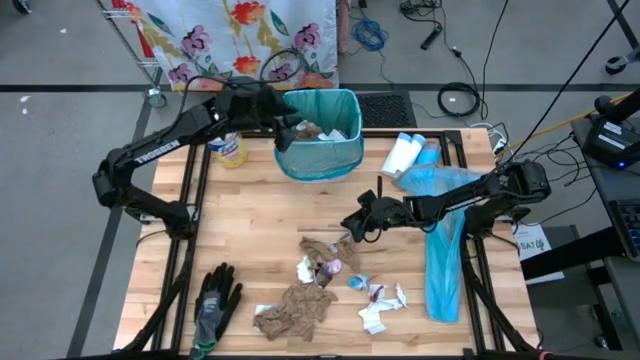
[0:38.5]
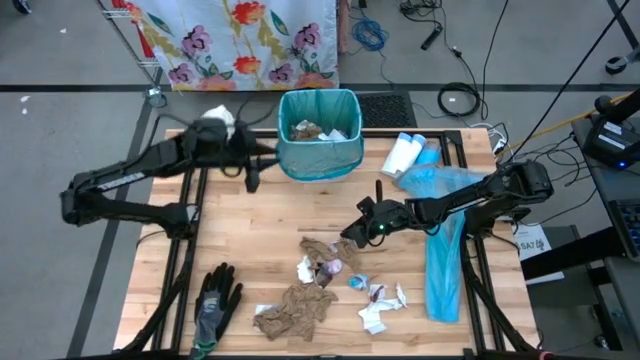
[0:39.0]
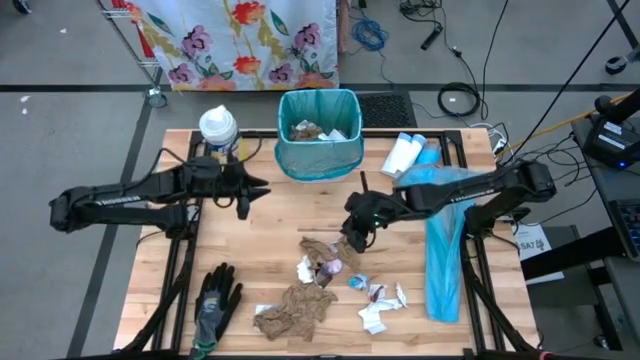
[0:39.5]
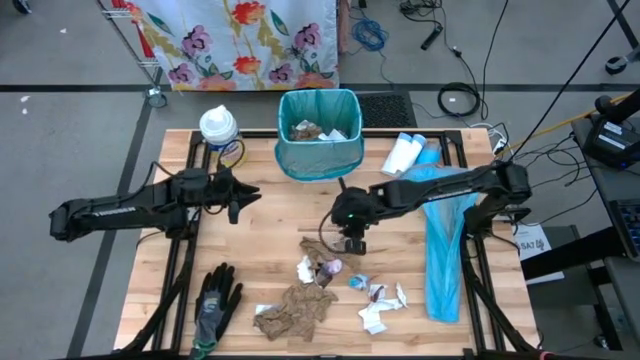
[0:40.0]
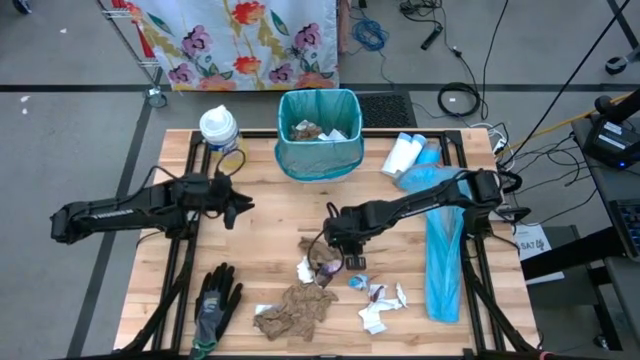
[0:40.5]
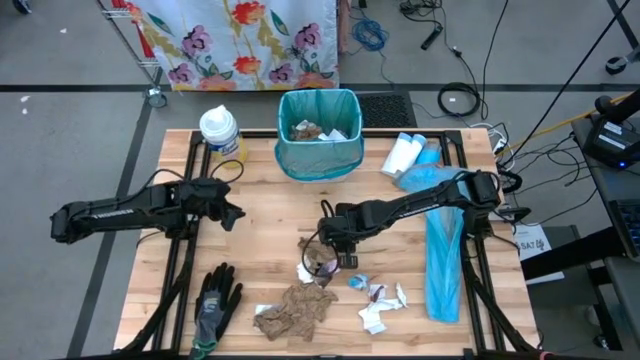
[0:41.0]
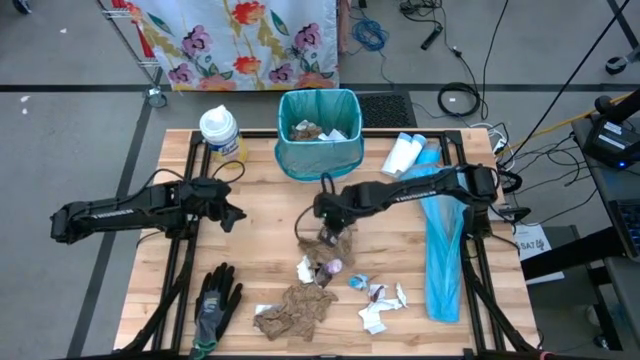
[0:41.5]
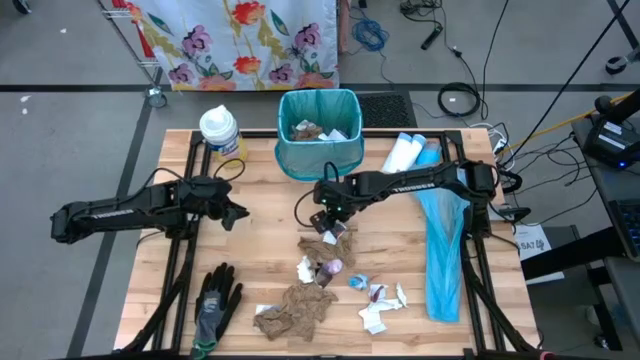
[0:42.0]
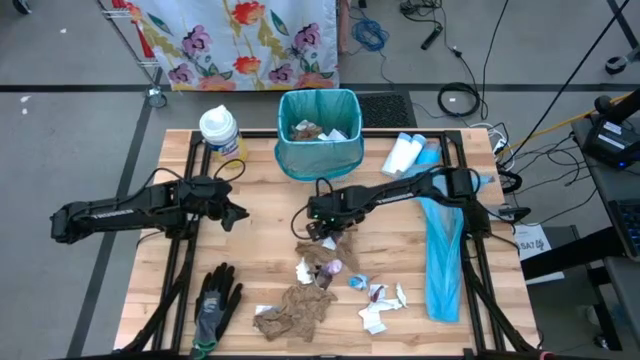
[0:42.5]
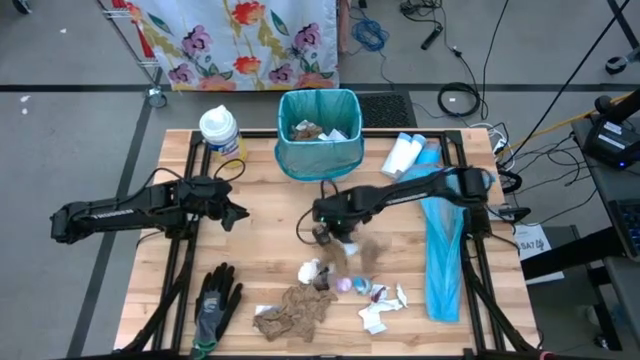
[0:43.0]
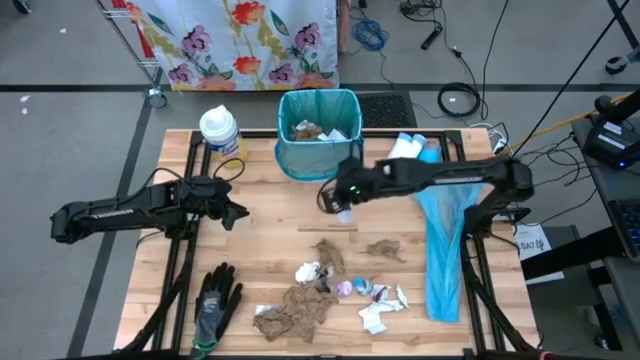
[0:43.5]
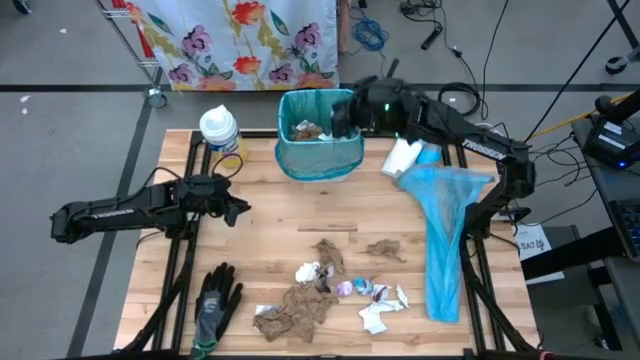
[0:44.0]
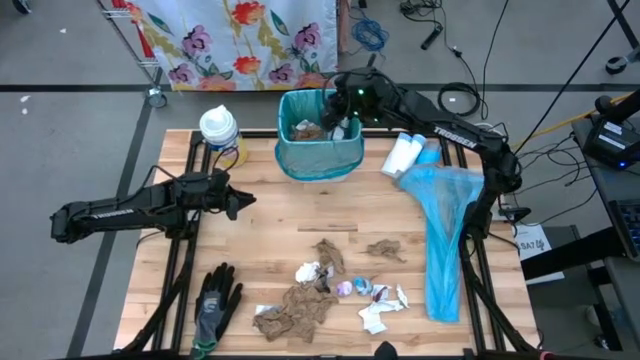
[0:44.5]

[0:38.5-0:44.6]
Task: place trash/remove bag and relplace
Put the white-black paper into the white trash bin

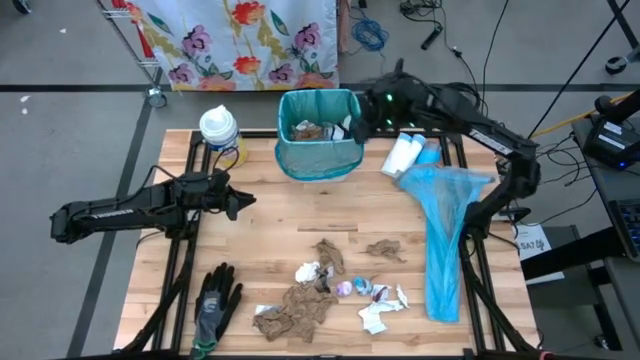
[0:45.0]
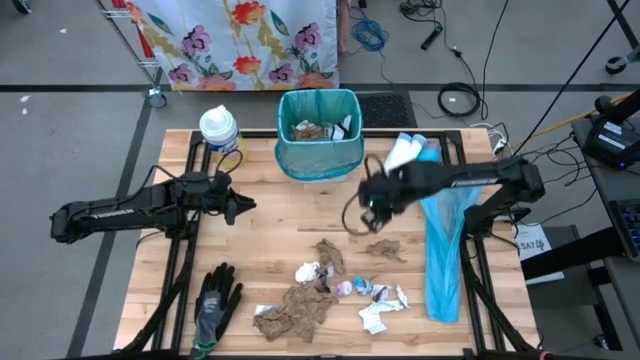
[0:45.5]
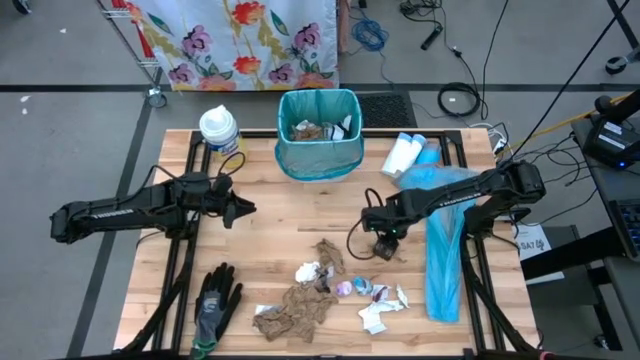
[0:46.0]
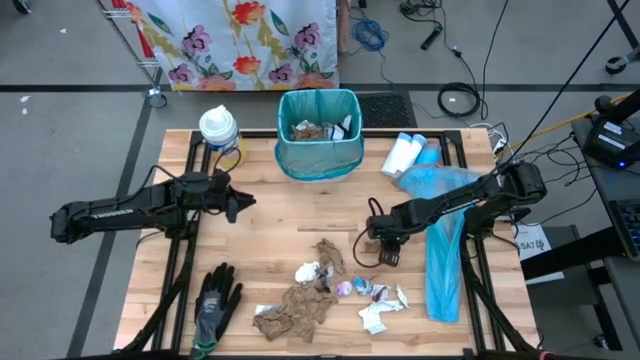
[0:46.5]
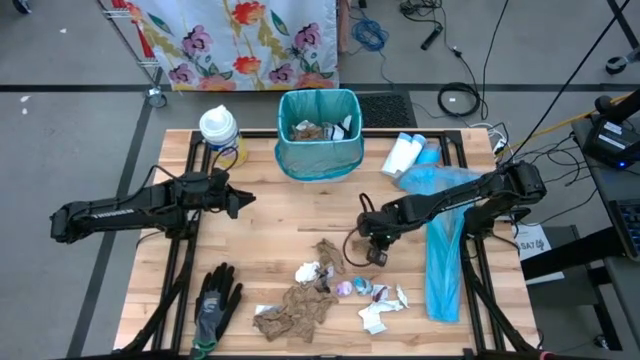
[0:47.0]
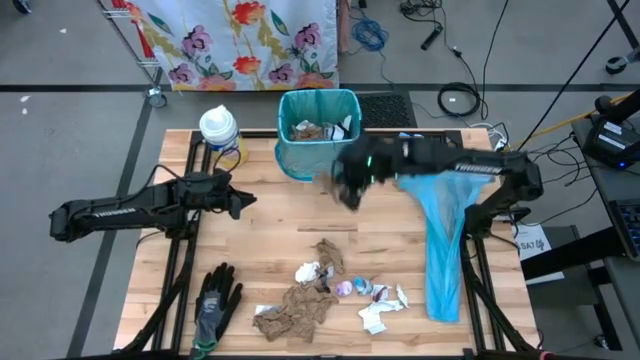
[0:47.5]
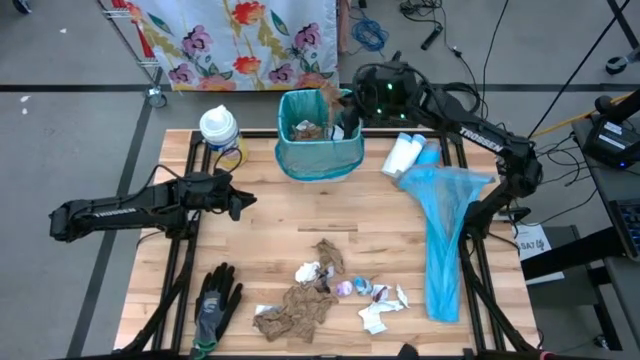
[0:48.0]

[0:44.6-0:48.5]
Put the brown napkin into the white trash bin

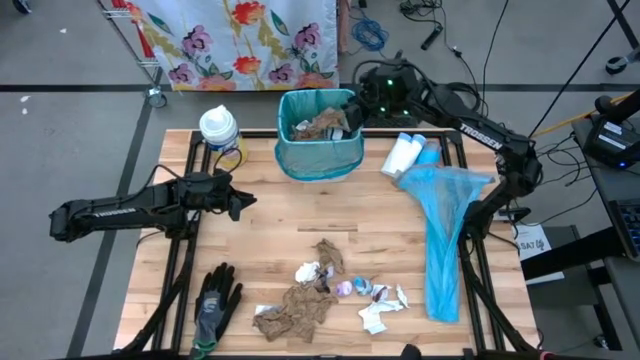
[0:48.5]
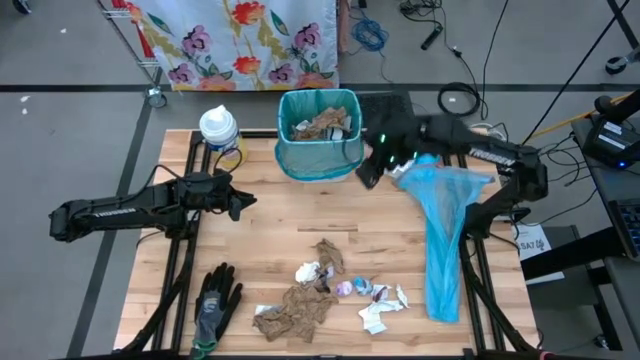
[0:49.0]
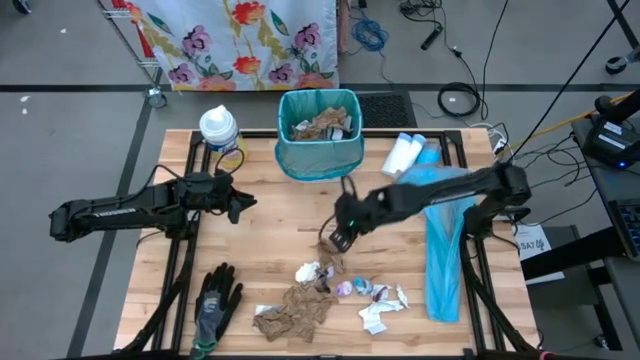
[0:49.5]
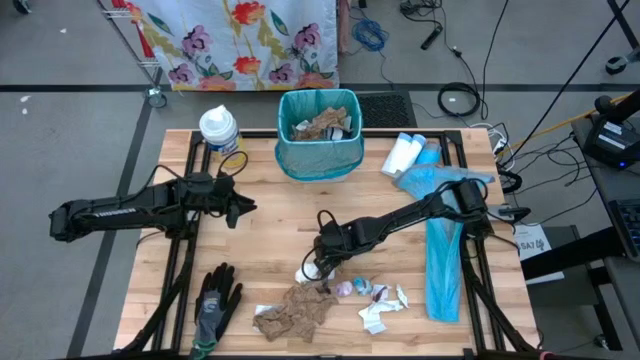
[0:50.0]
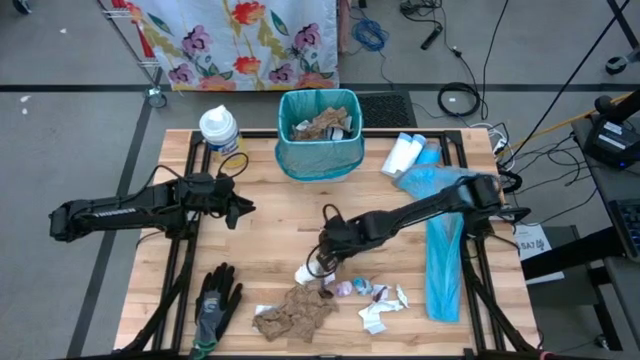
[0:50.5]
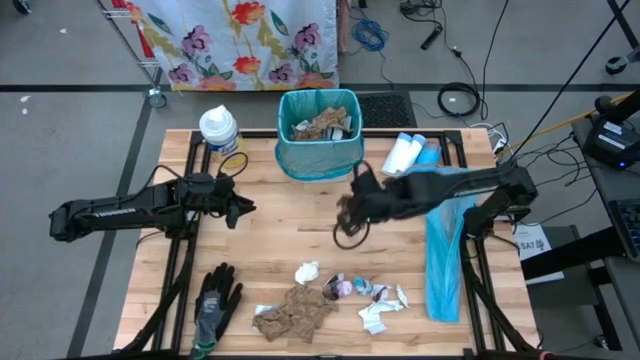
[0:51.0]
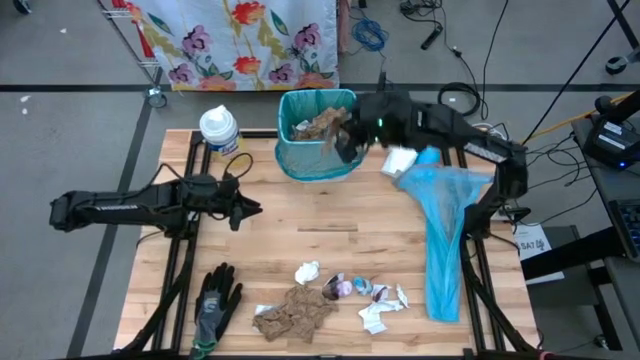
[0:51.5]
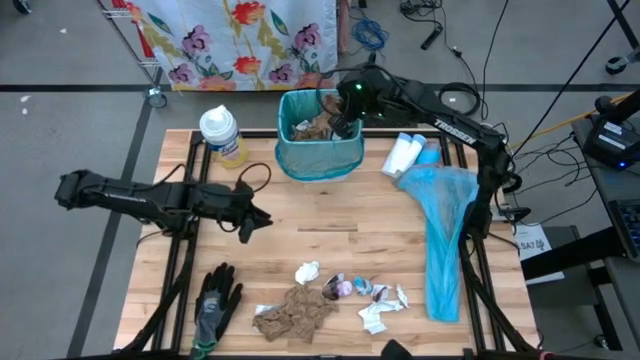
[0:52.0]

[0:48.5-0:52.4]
Put the brown napkin into the white trash bin

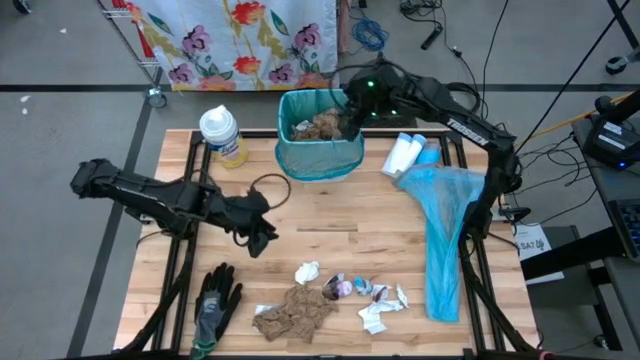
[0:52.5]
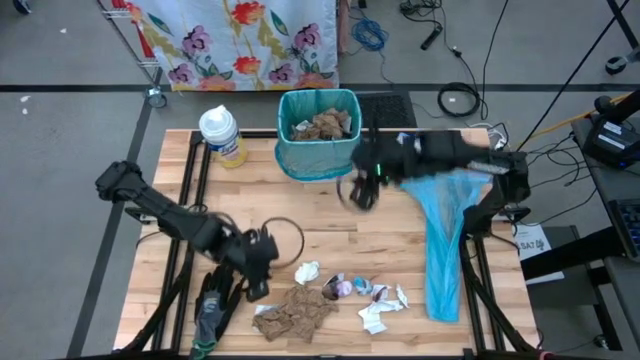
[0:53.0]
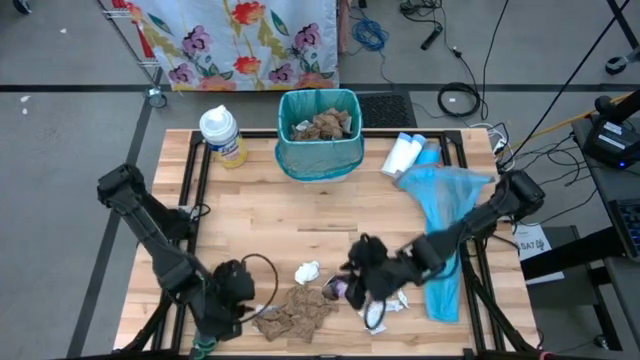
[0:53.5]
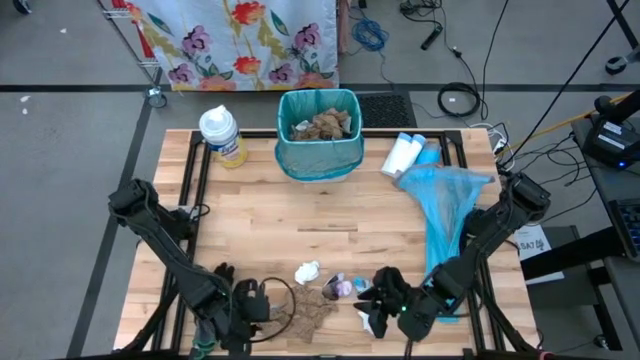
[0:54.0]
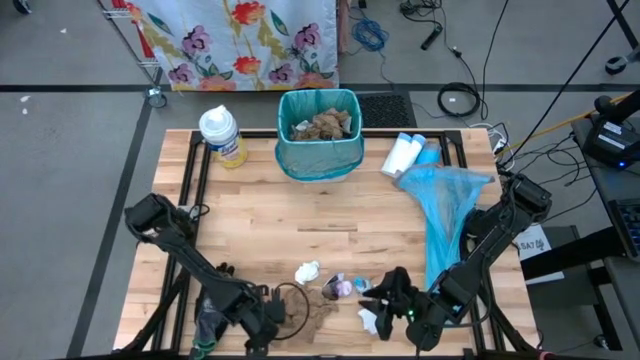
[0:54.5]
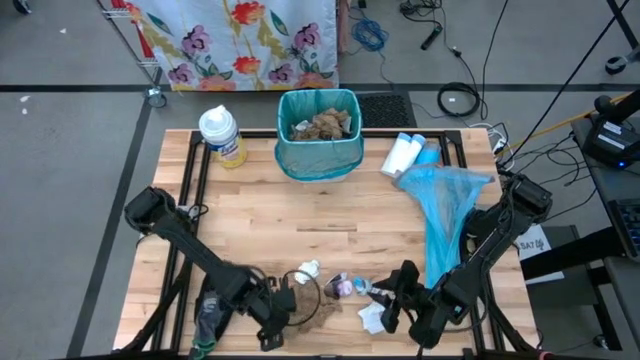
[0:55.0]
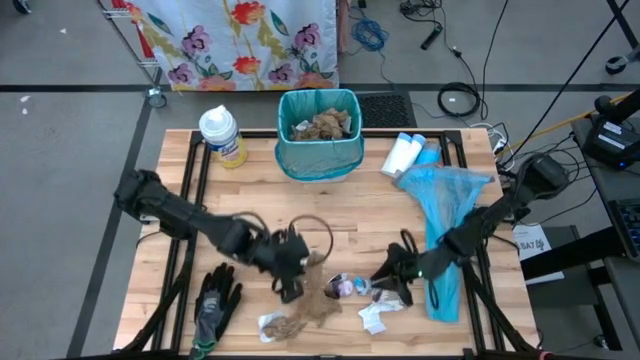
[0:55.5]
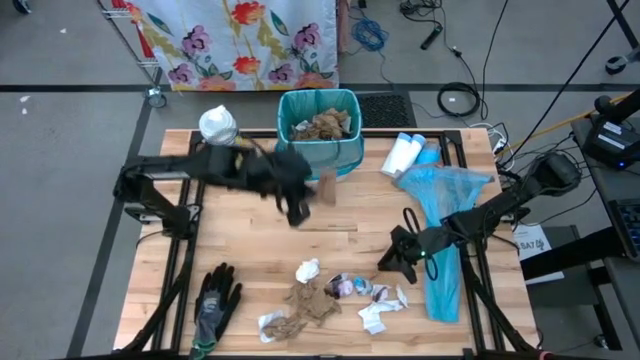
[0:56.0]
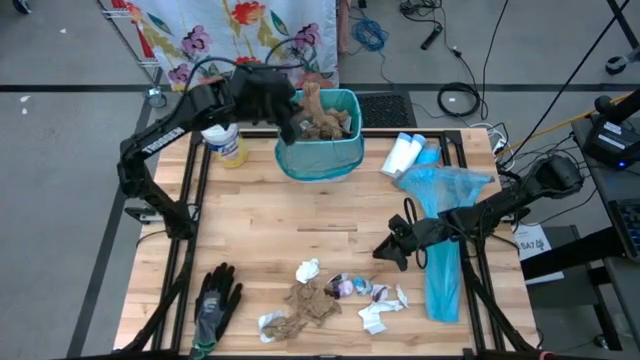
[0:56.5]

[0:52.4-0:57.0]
Put the brown napkin into the white trash bin

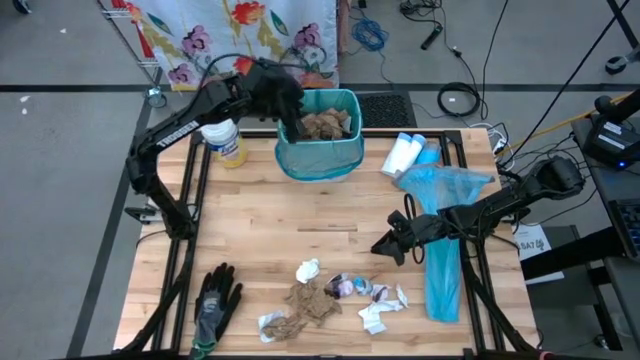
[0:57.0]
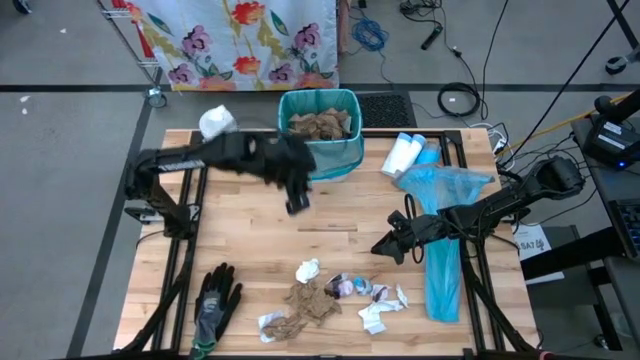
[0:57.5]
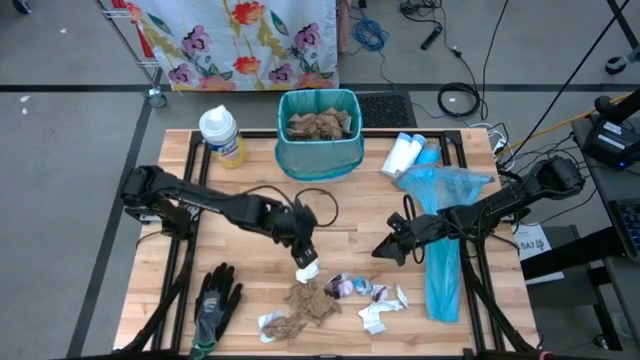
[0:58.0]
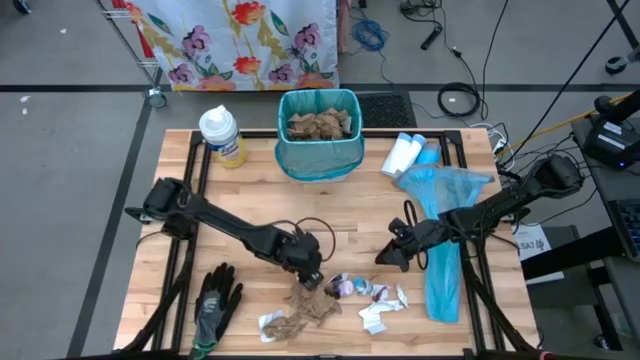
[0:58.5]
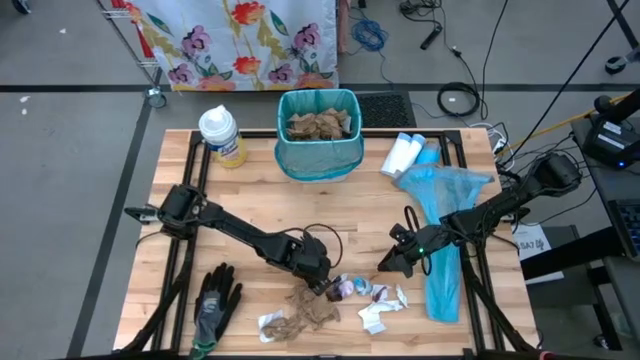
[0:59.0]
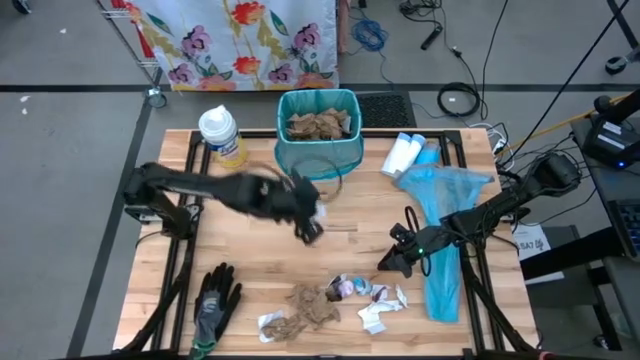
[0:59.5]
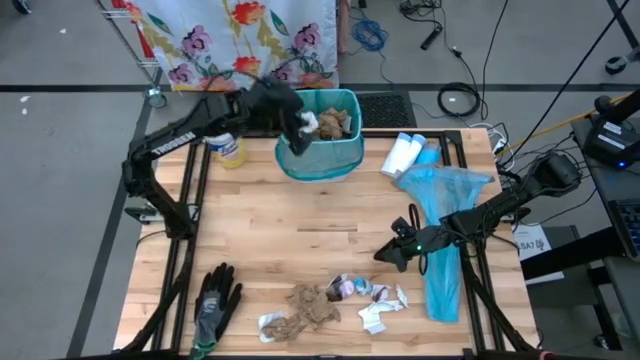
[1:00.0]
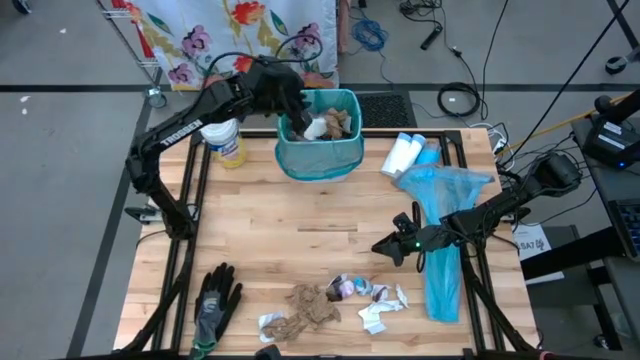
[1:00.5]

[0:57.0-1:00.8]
Put the white napkin into the white trash bin
